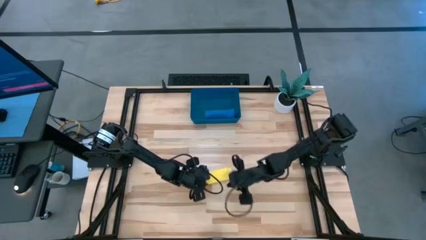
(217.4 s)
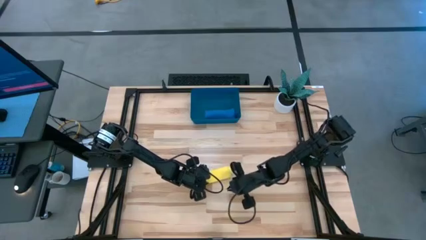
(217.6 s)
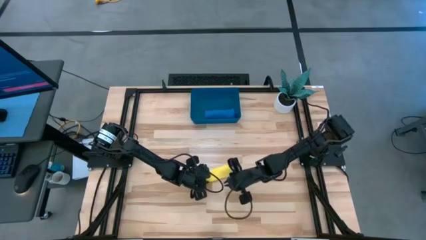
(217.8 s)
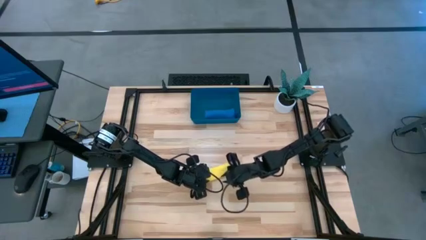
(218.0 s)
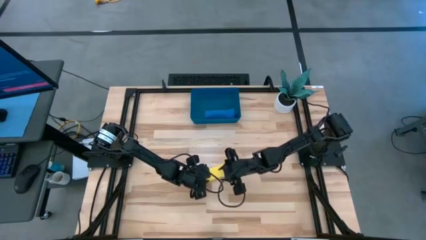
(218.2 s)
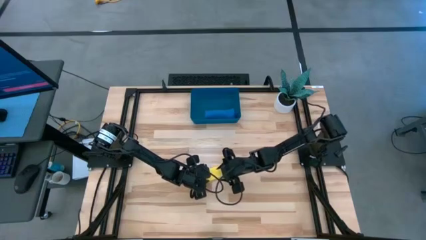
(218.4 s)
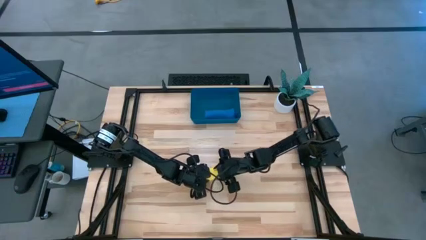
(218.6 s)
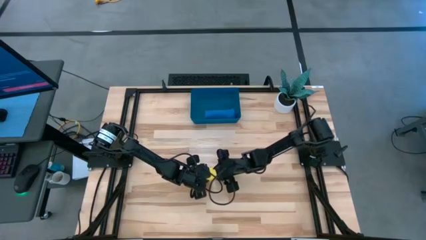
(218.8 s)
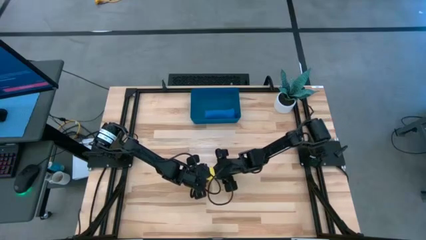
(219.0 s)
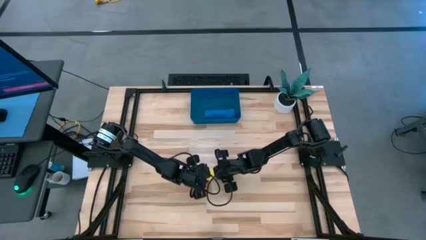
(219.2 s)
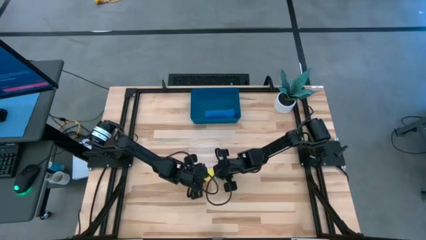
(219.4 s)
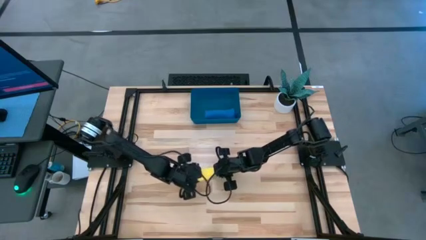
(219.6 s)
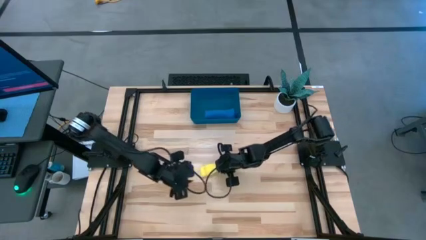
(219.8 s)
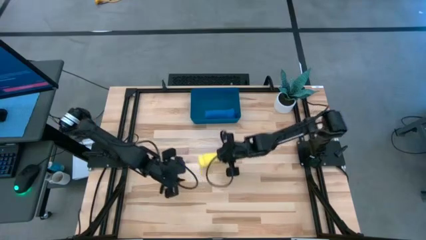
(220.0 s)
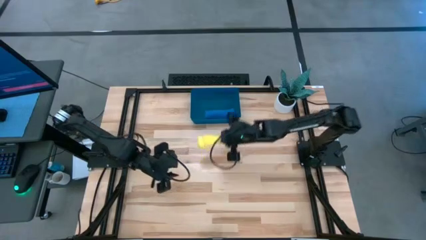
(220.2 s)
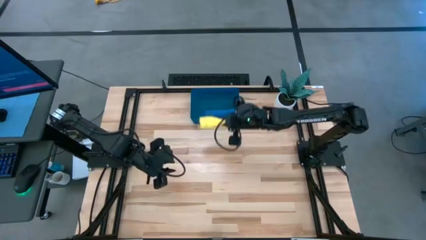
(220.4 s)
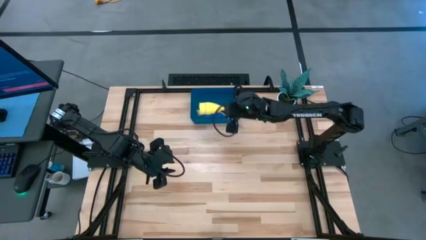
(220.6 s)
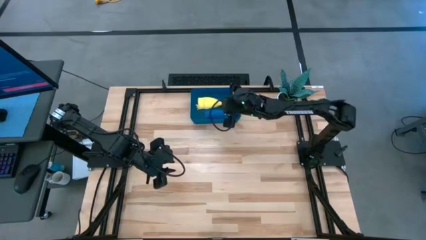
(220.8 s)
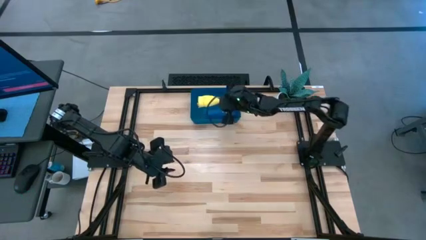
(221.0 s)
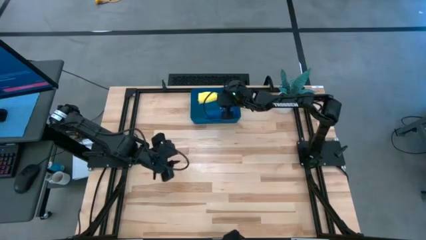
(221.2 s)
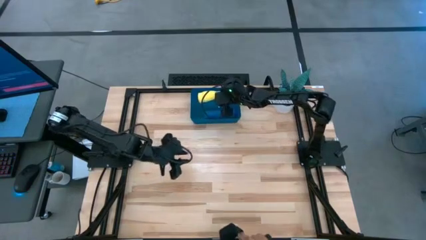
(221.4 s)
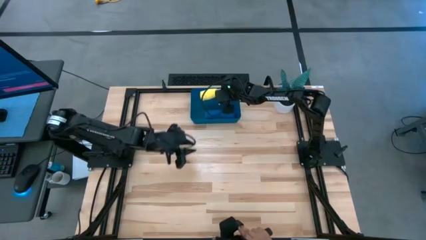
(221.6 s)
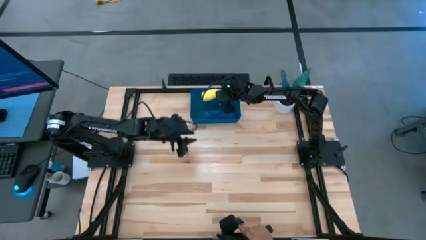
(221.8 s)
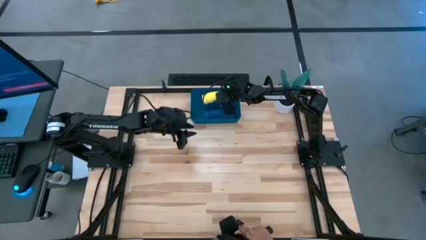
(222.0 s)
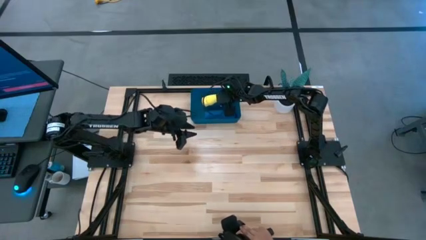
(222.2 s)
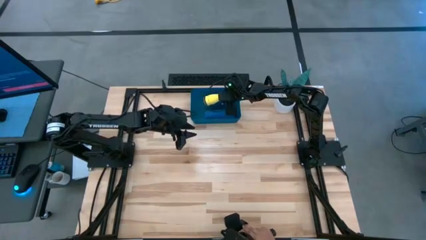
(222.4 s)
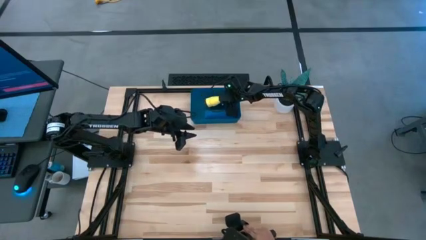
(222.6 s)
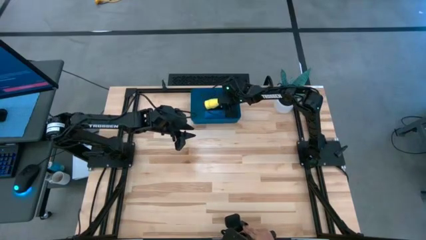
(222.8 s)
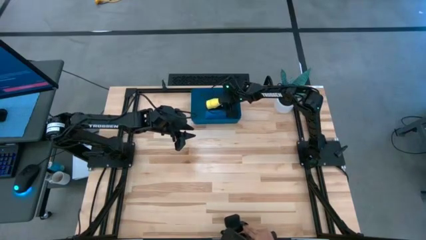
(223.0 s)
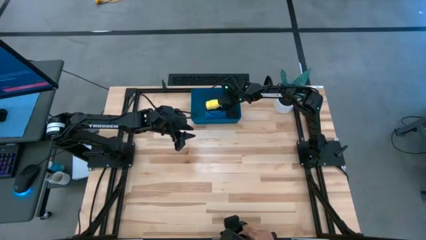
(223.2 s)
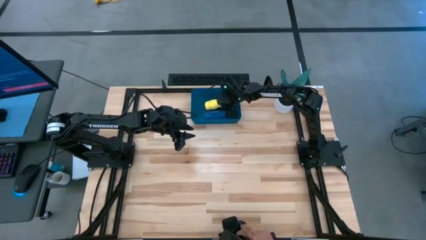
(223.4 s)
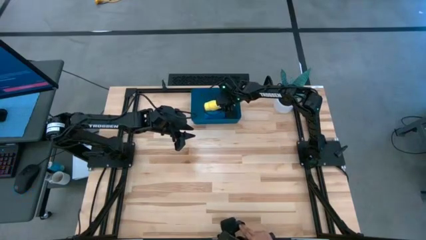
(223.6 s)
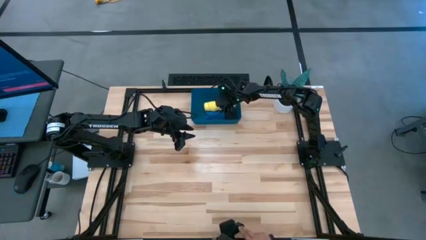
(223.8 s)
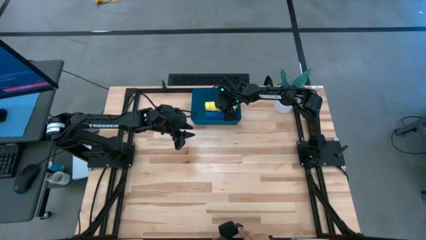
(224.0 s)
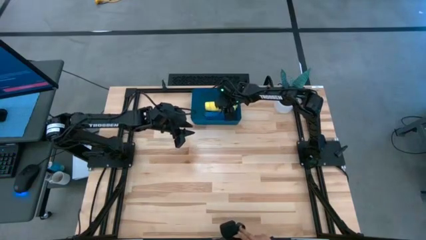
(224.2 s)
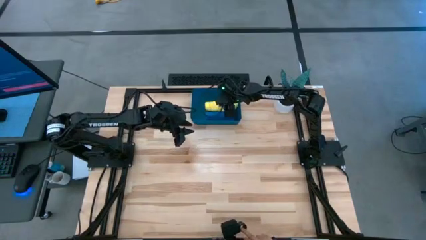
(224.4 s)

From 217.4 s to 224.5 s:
Task: Roll microfiber towels into tight, uniform cylinder then place into a basket
Put the rolled yellow towel into the blue bin

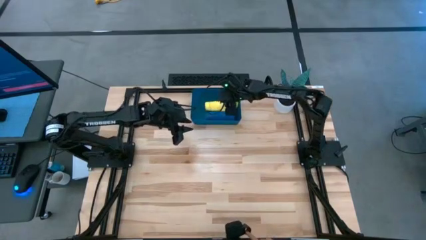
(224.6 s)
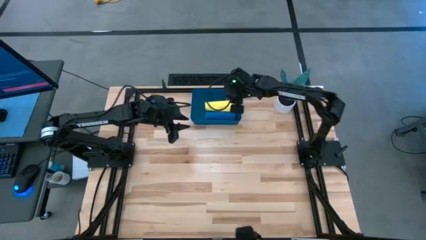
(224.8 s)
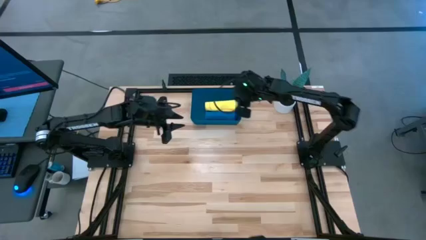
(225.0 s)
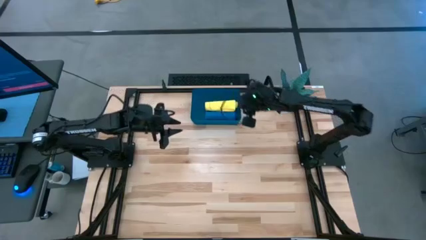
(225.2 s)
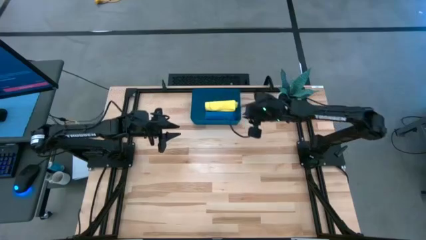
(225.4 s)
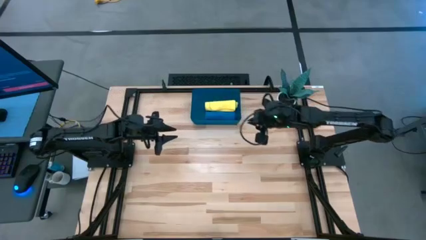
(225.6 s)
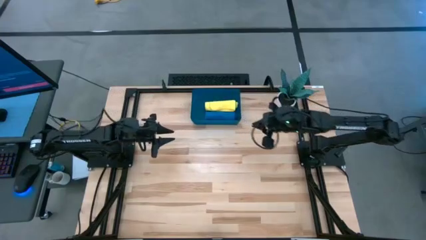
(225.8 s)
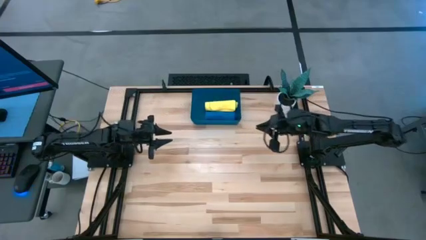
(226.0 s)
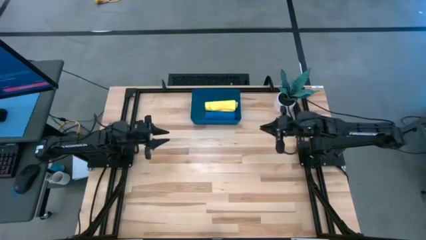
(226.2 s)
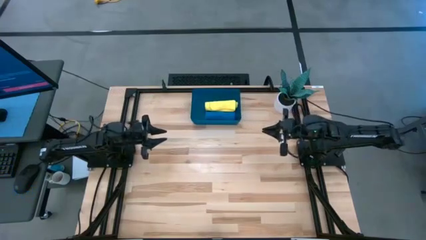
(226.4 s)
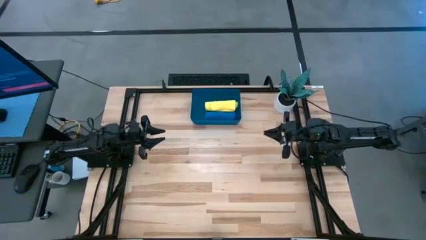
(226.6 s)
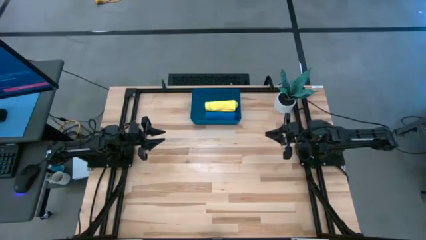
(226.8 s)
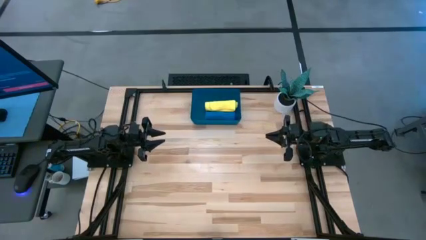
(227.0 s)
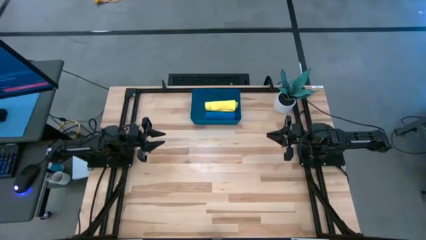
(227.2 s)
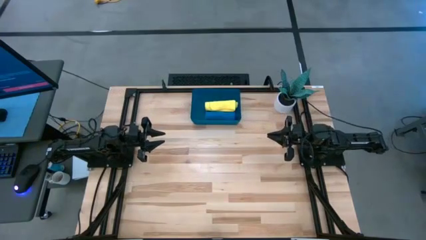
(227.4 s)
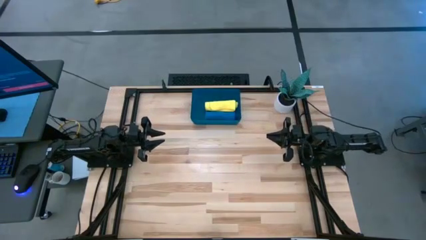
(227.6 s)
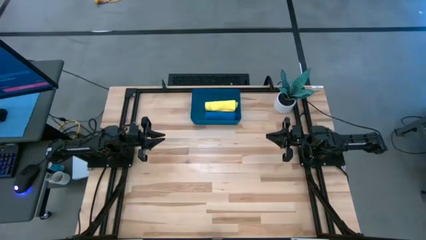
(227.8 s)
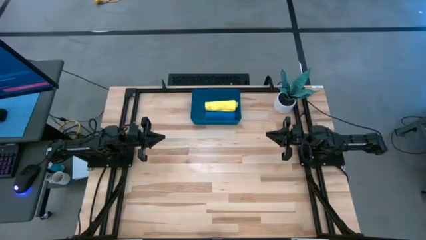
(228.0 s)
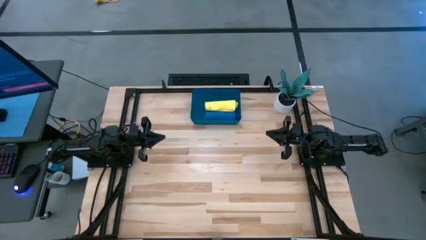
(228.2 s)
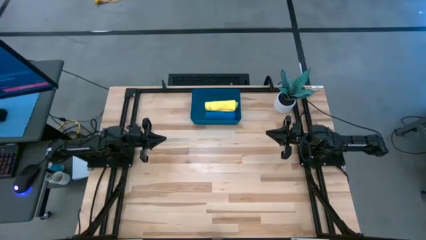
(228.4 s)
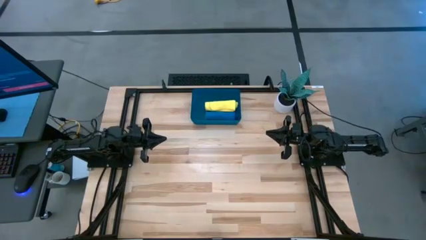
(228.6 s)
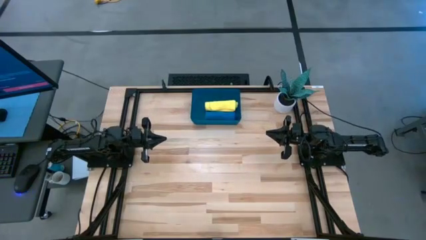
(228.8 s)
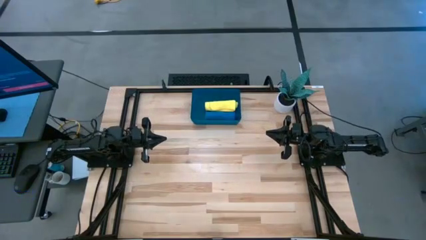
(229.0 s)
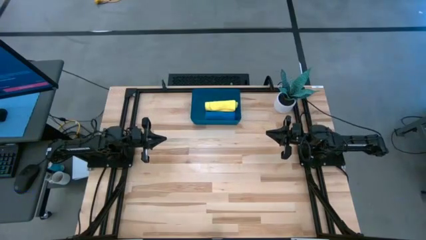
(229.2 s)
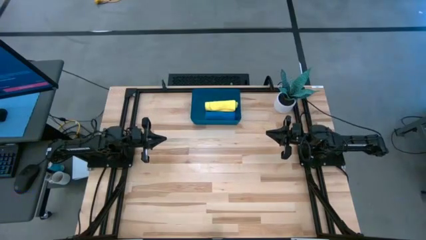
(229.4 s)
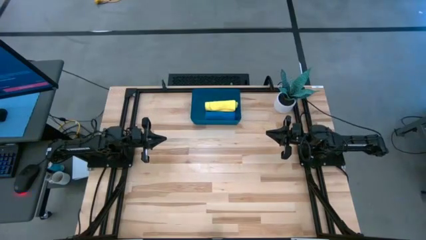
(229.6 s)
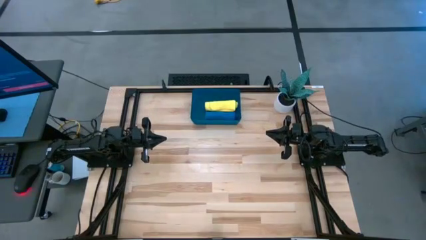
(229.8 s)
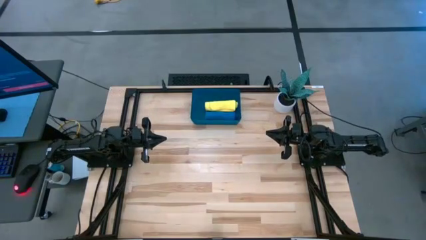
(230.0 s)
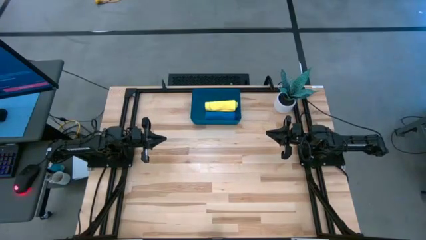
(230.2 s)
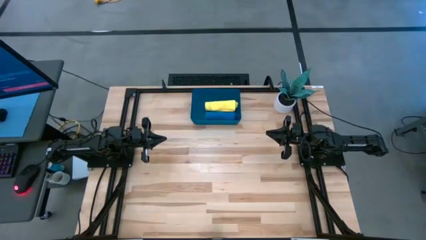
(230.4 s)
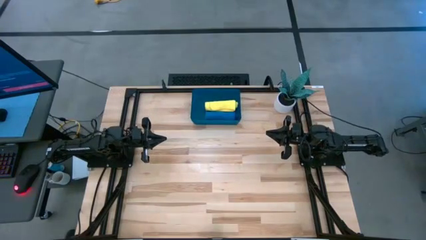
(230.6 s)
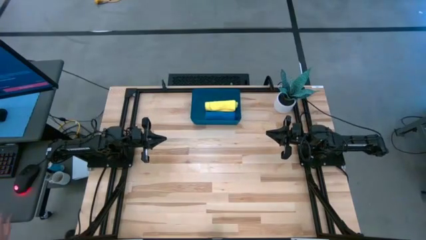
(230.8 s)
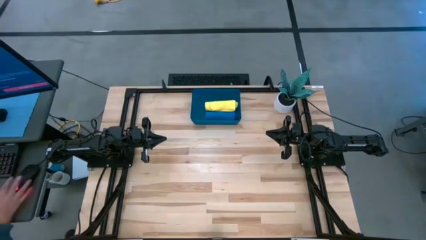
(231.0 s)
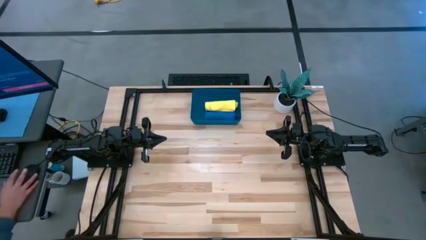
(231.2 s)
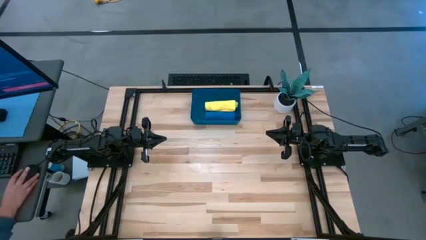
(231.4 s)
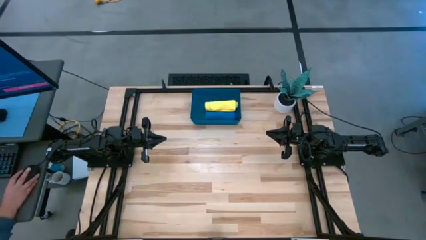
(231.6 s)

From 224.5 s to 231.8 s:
Return to Home Position

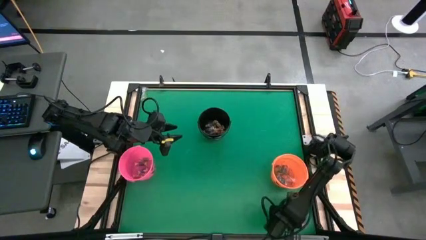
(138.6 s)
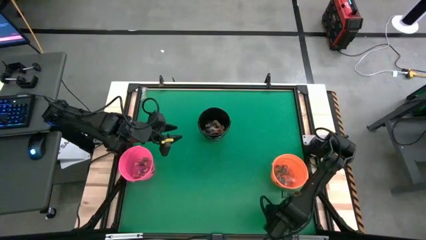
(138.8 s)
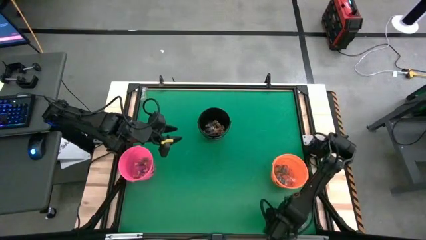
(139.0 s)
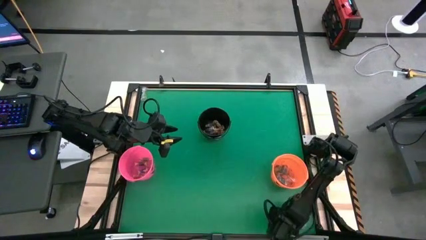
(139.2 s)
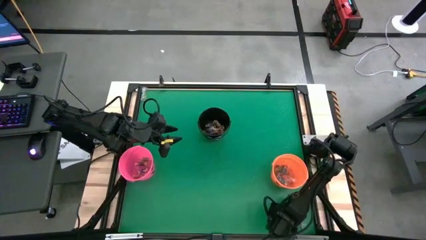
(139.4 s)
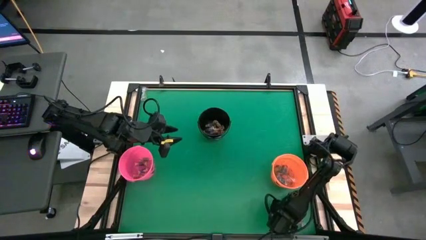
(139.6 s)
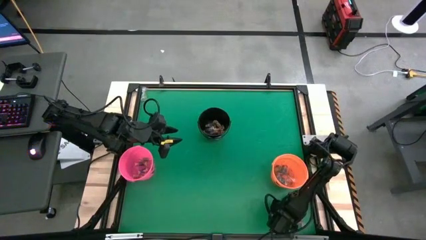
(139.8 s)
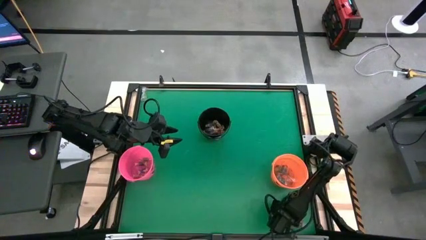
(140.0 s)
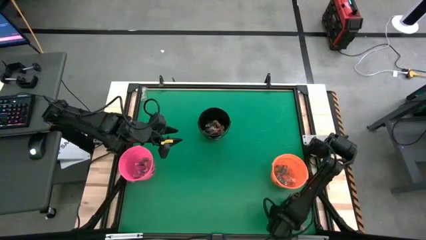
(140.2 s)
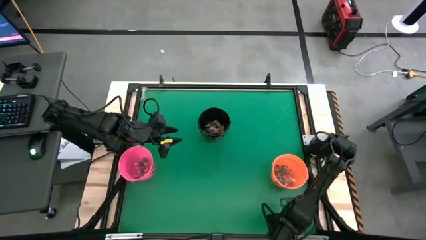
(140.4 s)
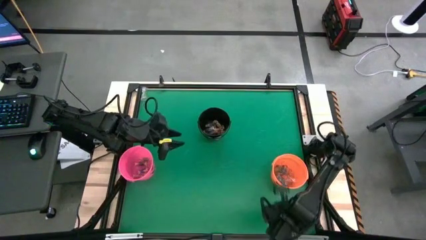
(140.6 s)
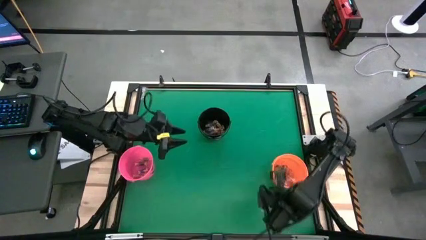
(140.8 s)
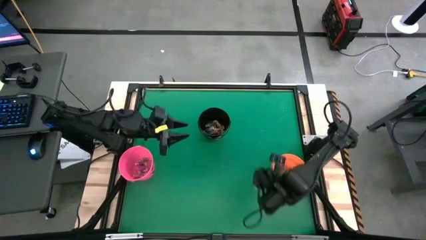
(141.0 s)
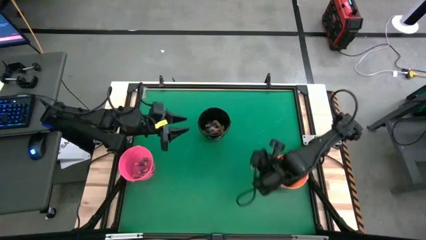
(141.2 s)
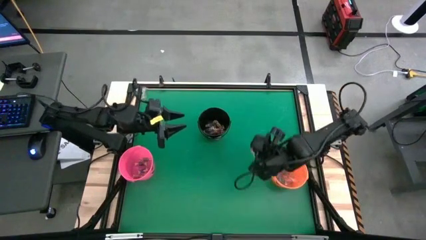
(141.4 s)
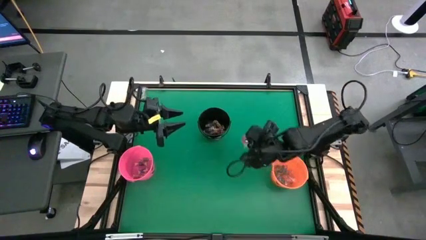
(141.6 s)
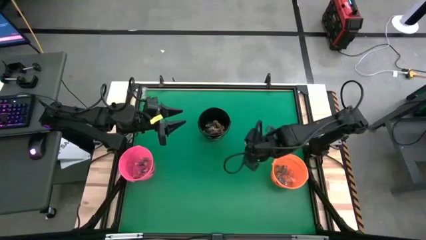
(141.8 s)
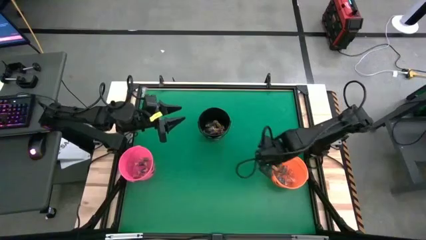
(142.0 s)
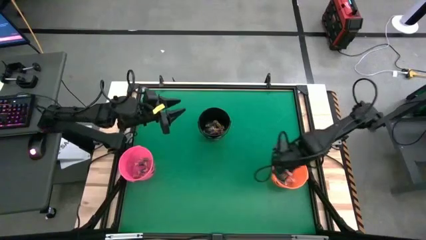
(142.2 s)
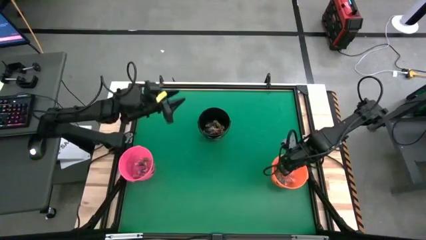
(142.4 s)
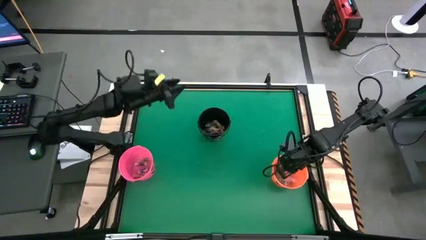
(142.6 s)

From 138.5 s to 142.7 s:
Task: Sort candy by brand, put in halloween buckets
Put the red gummy into the orange bin
